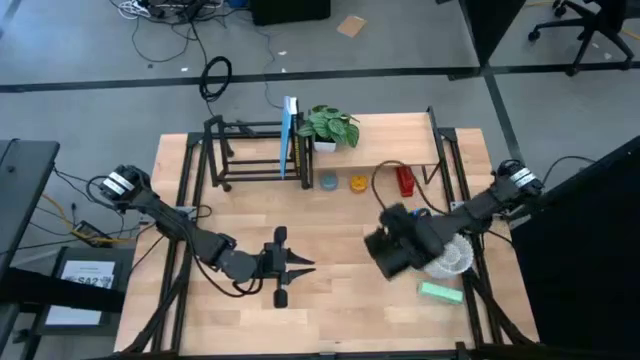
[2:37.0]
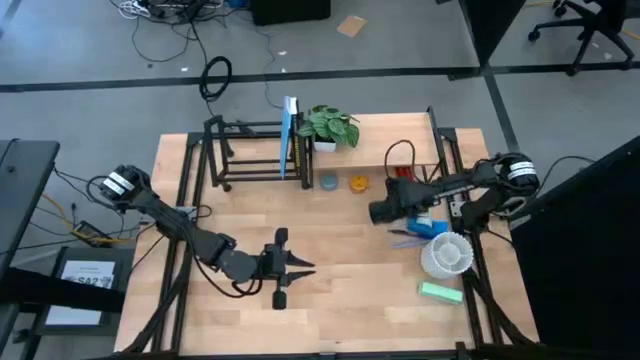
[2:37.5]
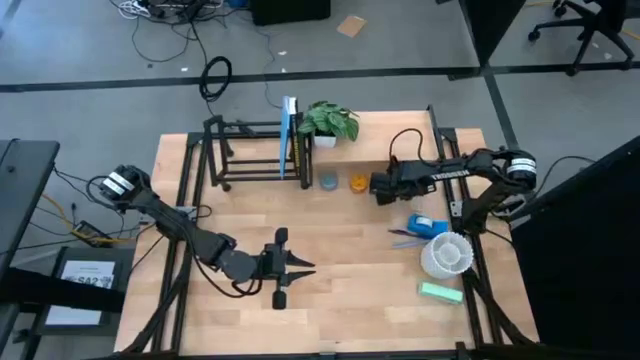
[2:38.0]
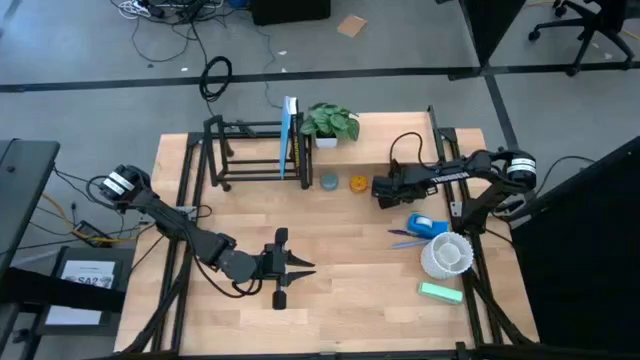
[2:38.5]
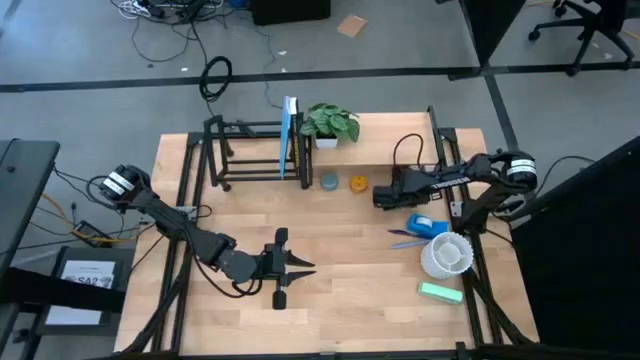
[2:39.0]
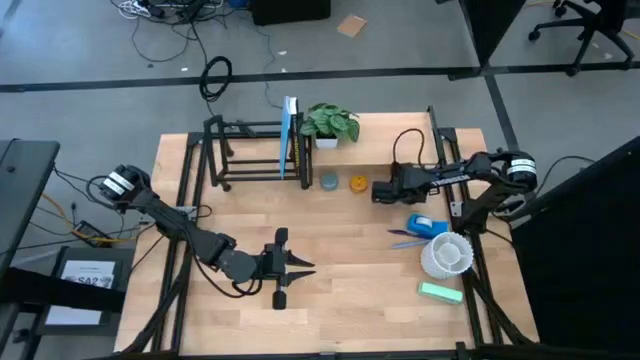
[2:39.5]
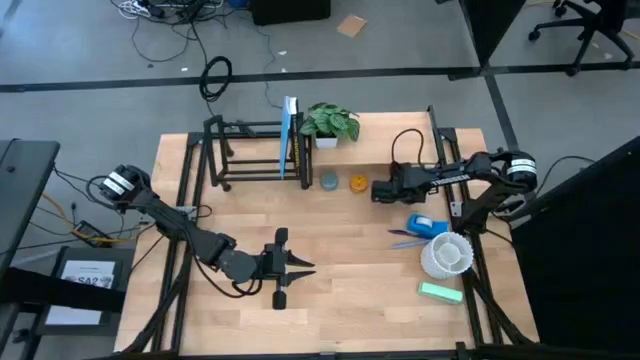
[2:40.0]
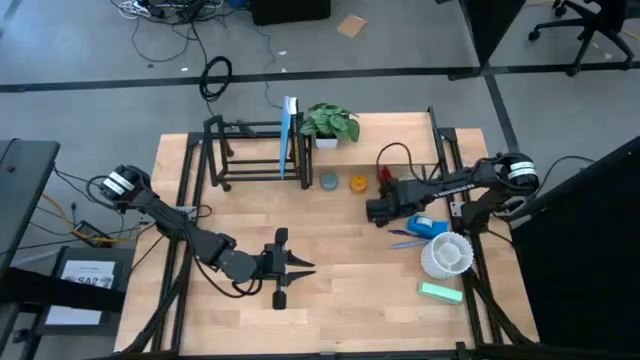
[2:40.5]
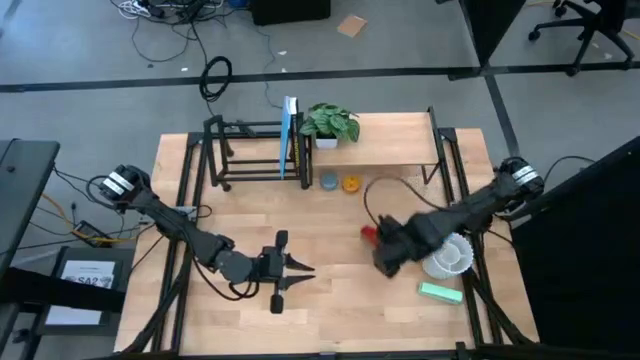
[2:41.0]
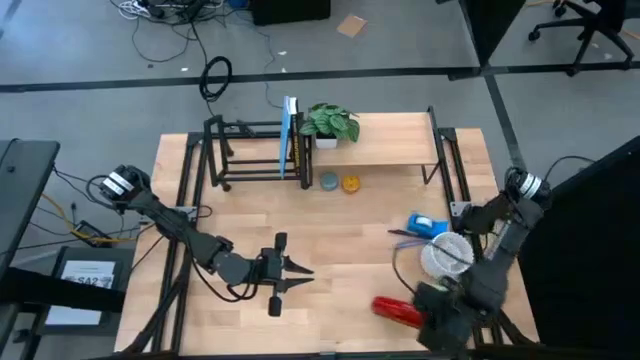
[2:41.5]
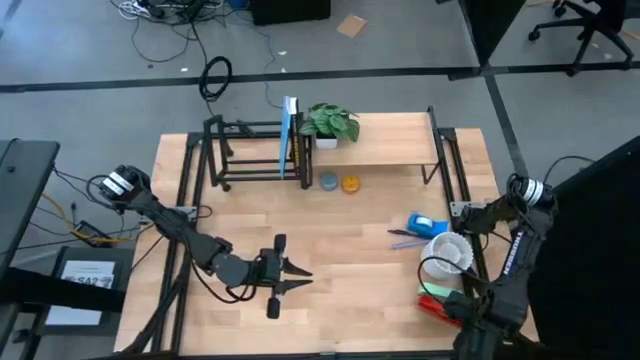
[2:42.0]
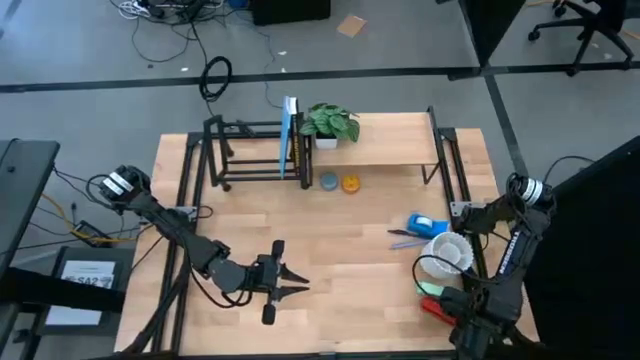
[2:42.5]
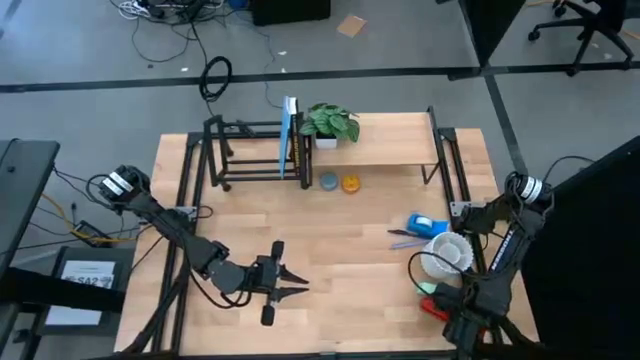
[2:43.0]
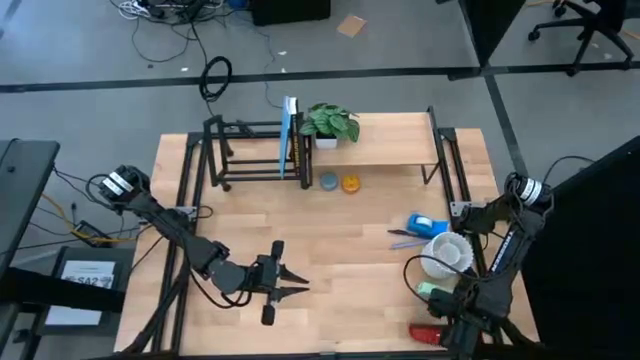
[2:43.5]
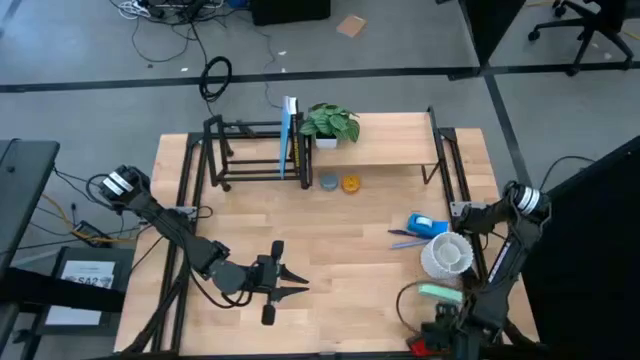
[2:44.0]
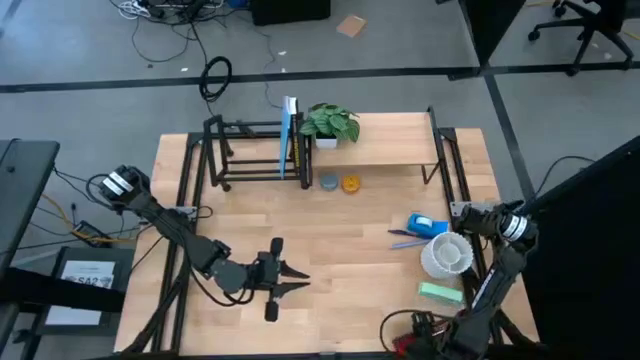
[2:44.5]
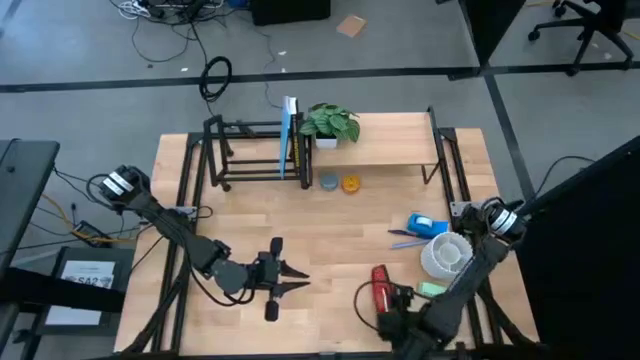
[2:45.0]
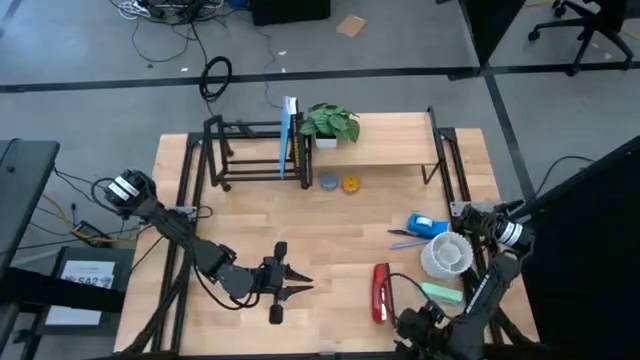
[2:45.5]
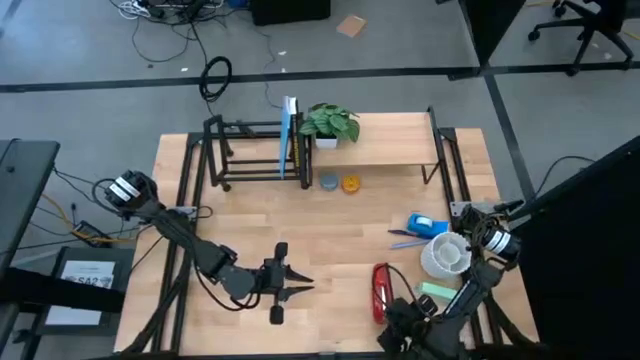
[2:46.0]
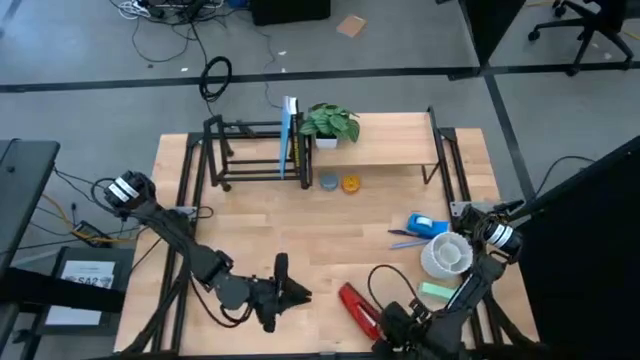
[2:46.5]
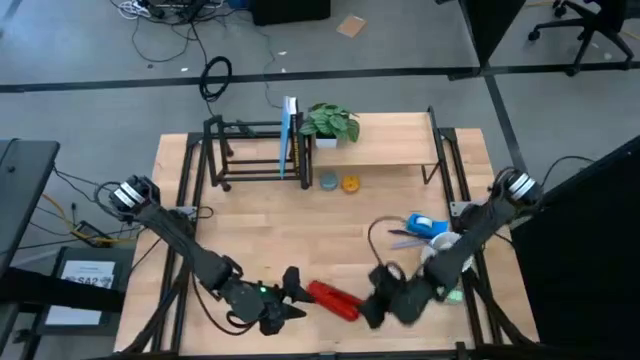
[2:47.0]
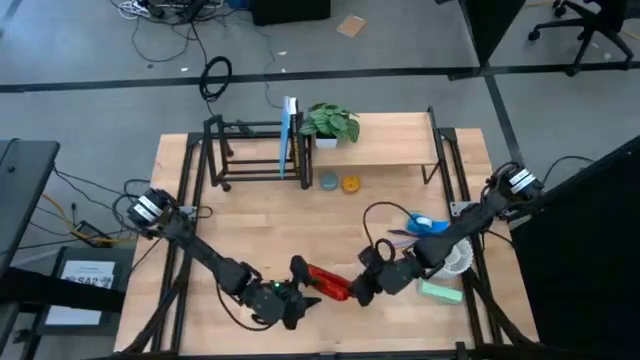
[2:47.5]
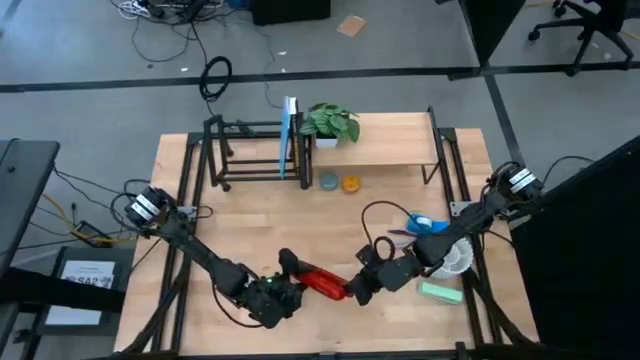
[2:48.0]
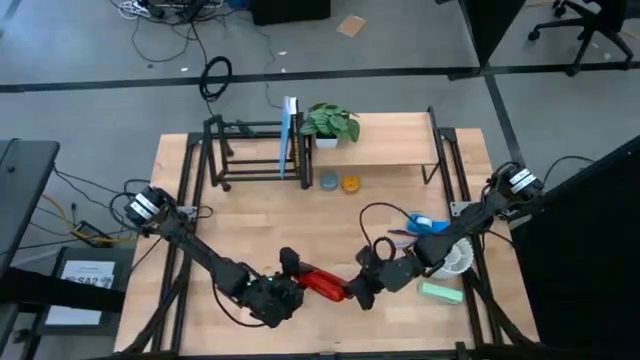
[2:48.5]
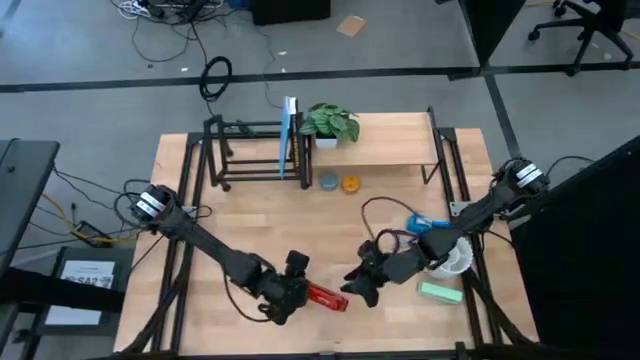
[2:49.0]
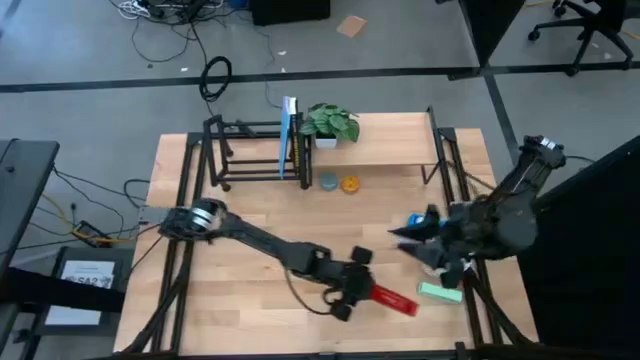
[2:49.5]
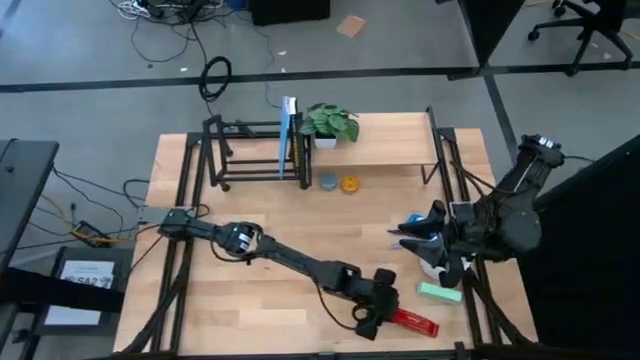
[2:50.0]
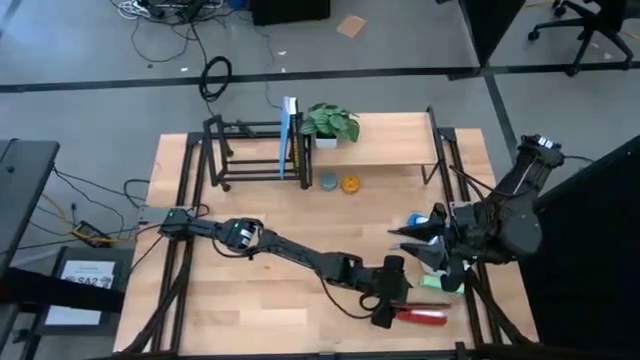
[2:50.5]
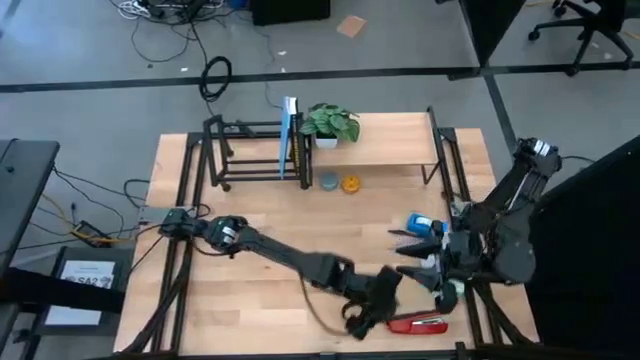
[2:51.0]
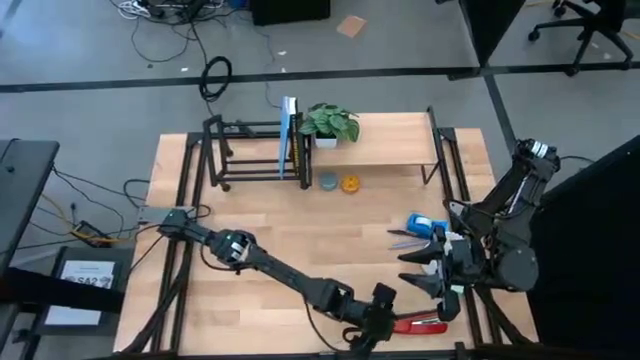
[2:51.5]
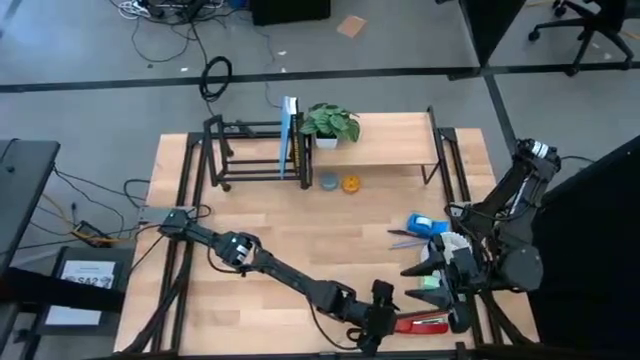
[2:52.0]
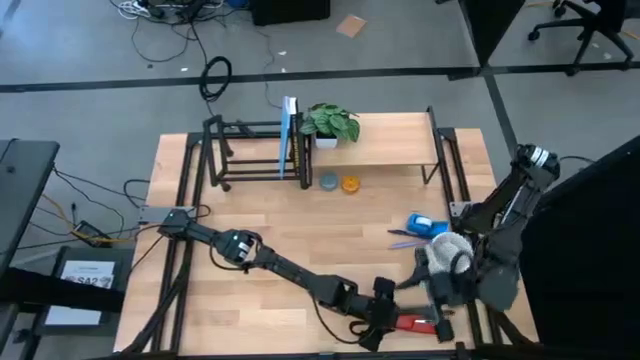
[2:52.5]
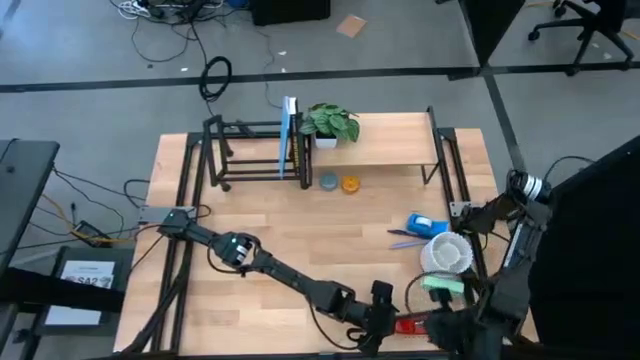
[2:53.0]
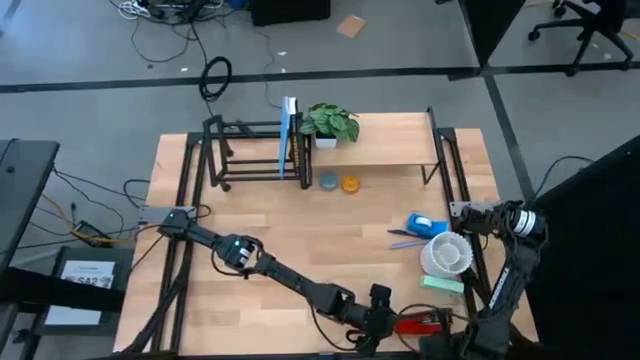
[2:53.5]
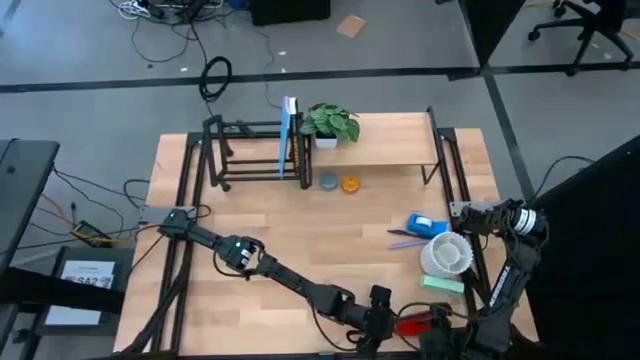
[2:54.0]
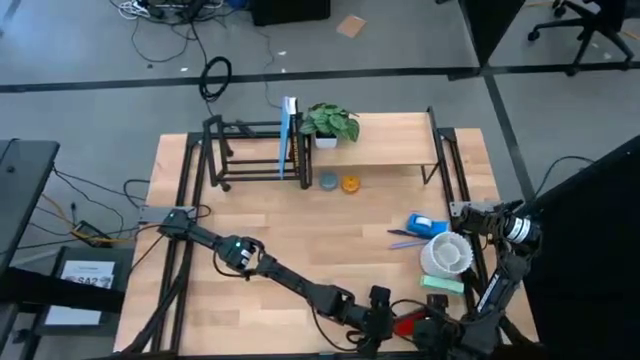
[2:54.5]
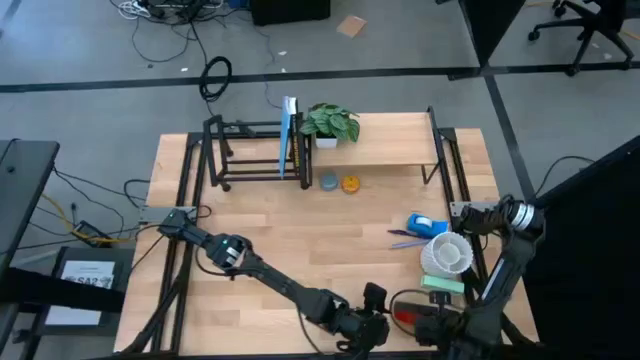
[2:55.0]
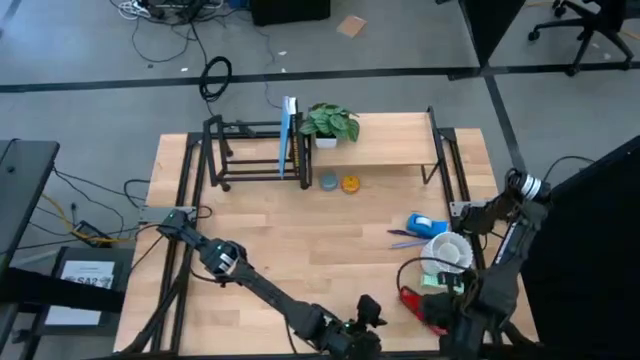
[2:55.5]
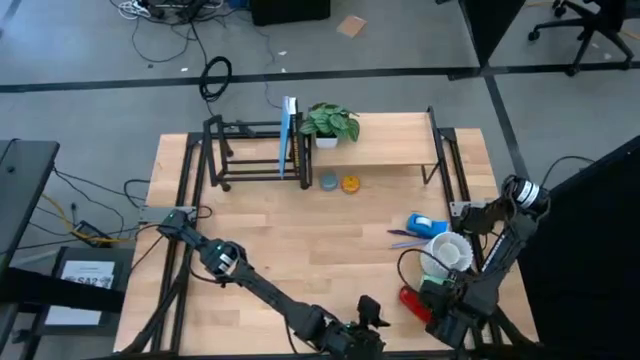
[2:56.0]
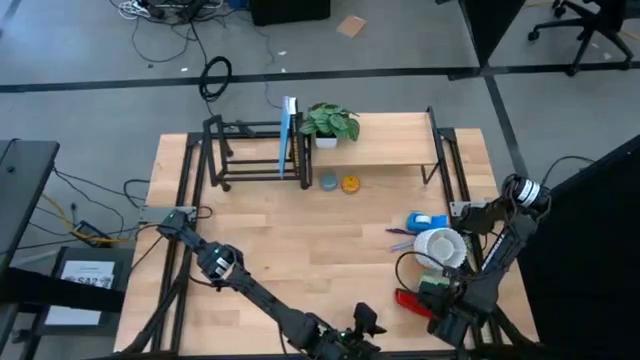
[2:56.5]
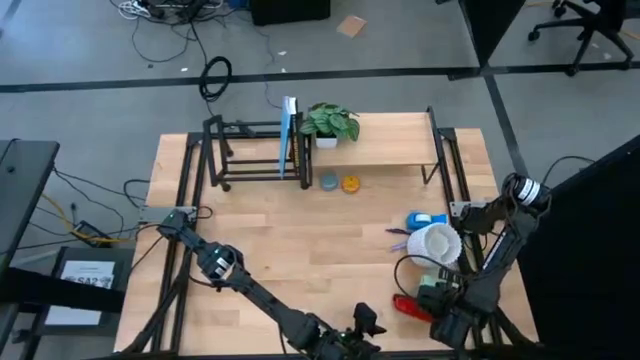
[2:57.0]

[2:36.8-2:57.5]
Task: Stock shelves
Remove the red stapler from under the shelf

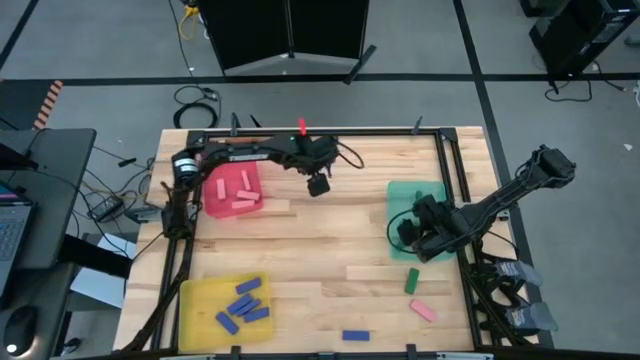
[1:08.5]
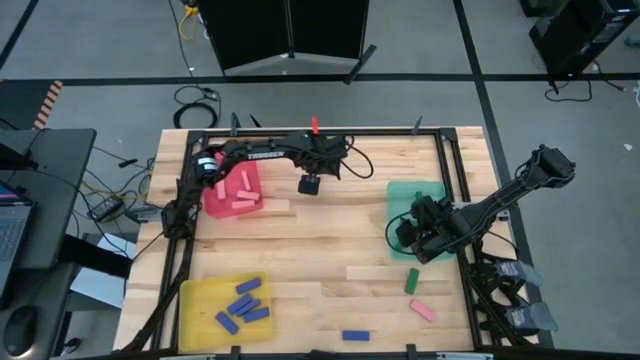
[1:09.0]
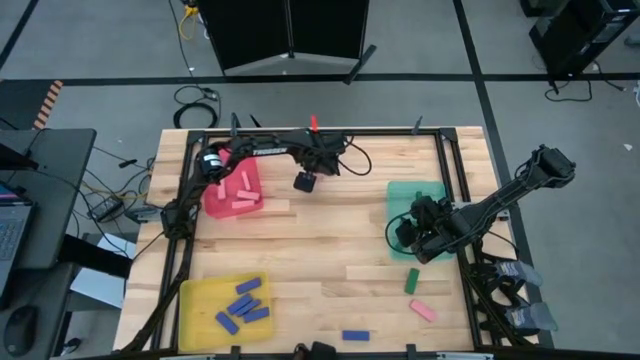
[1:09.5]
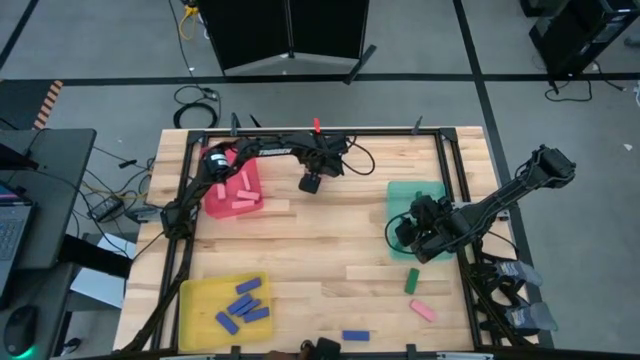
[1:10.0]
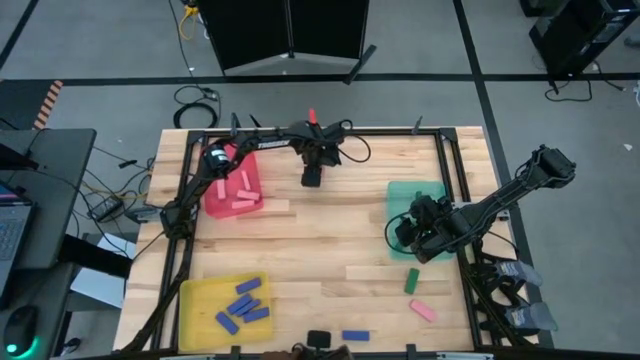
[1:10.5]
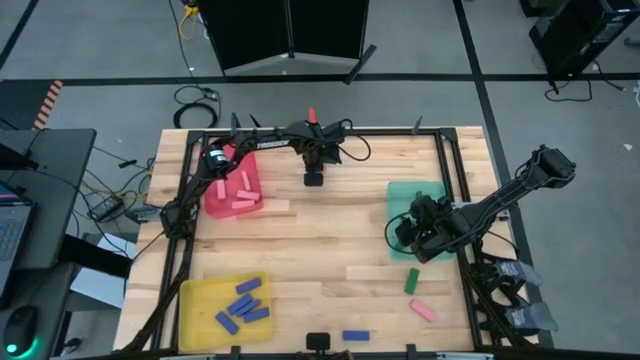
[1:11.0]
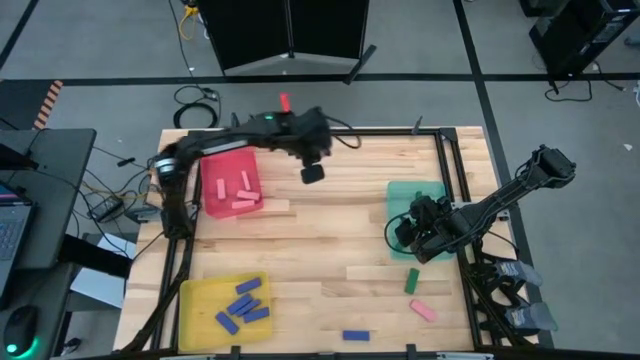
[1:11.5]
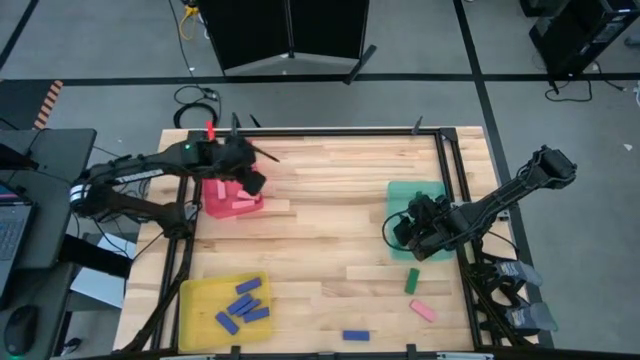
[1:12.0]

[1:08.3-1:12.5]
Task: Sort blocks
Put the pink block into the red bin
